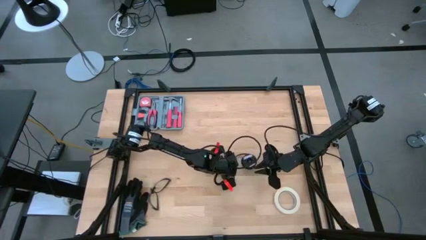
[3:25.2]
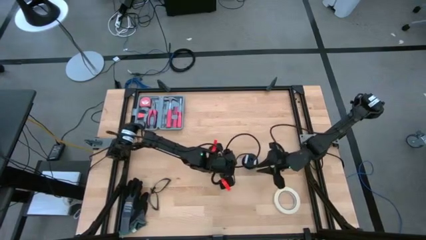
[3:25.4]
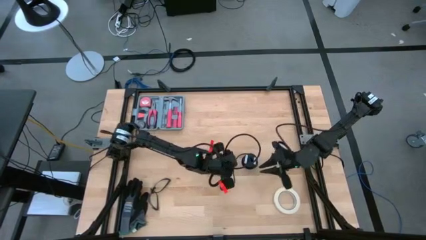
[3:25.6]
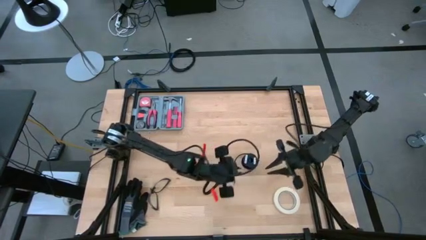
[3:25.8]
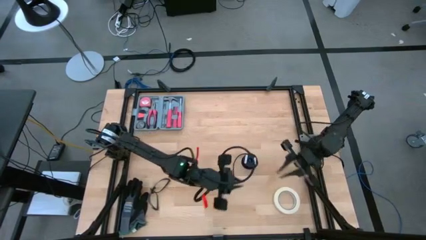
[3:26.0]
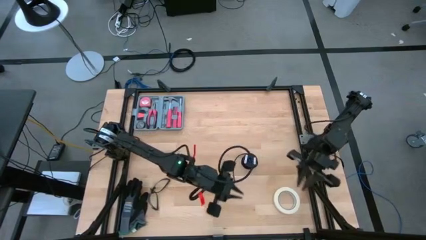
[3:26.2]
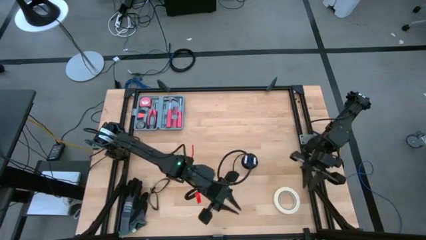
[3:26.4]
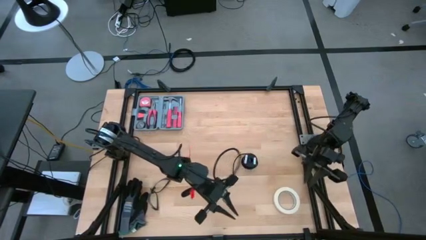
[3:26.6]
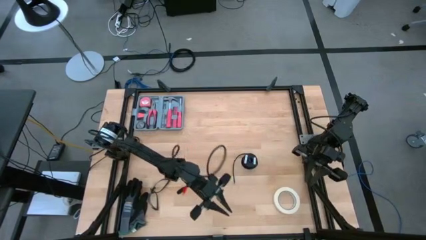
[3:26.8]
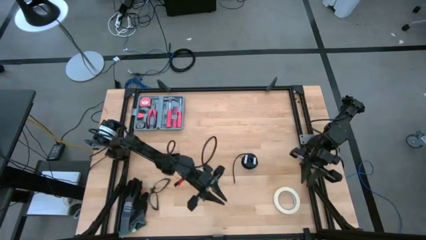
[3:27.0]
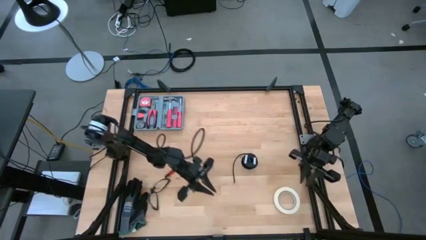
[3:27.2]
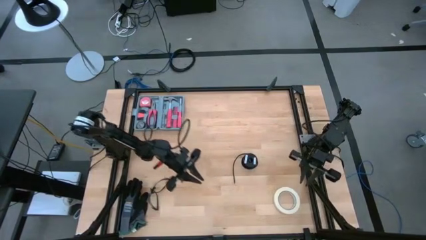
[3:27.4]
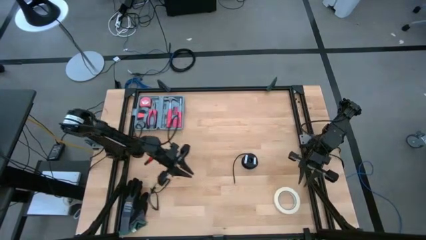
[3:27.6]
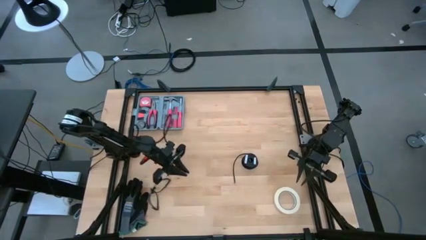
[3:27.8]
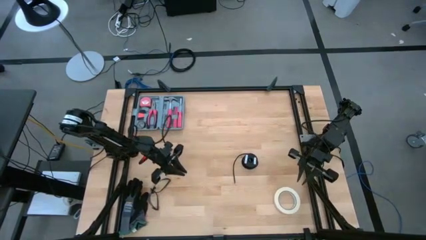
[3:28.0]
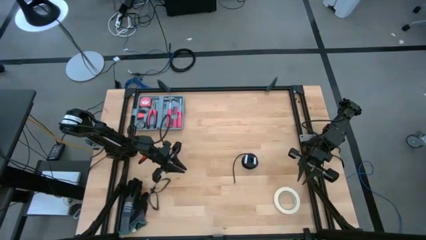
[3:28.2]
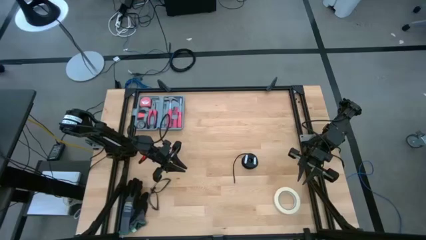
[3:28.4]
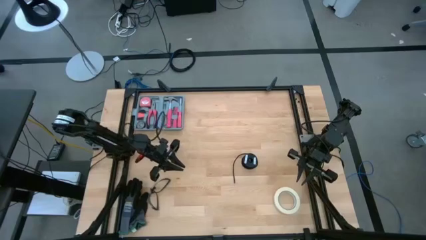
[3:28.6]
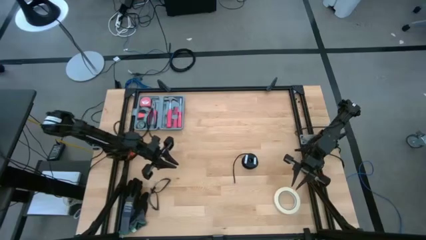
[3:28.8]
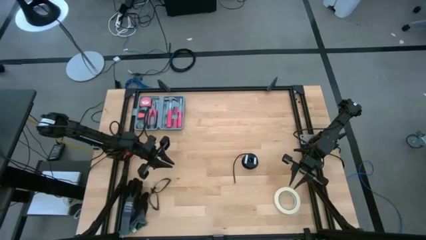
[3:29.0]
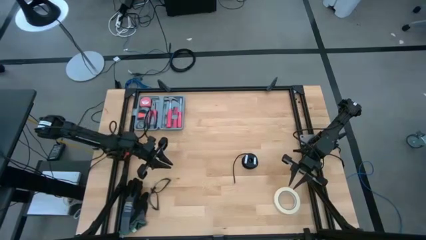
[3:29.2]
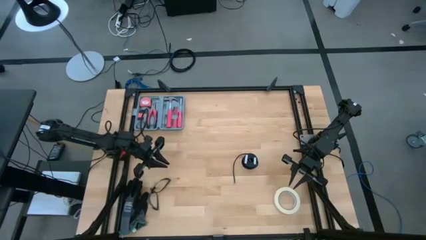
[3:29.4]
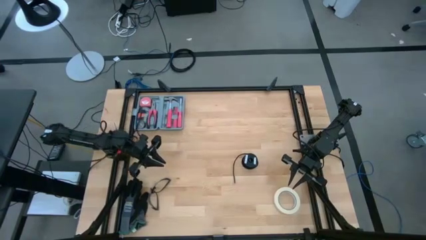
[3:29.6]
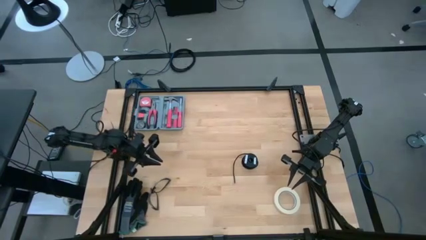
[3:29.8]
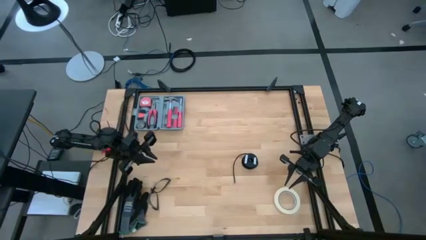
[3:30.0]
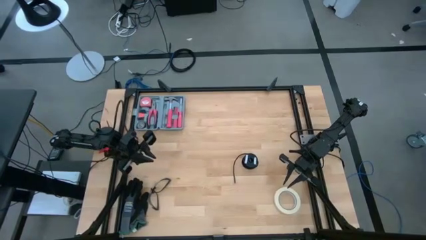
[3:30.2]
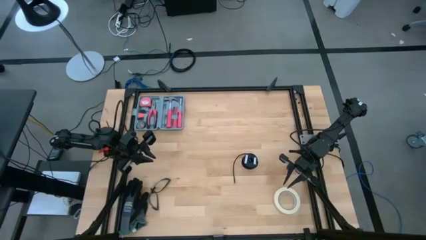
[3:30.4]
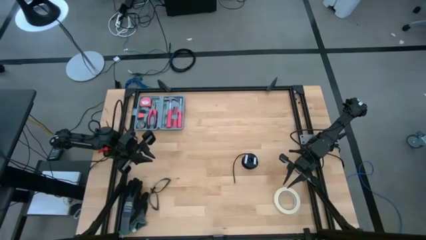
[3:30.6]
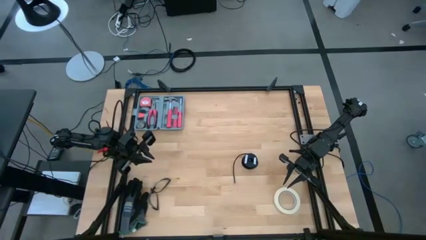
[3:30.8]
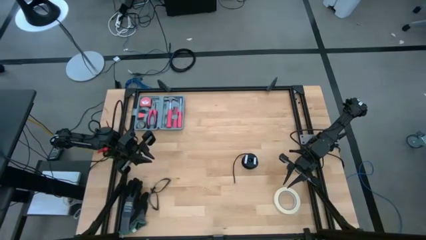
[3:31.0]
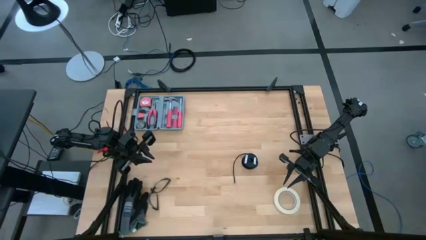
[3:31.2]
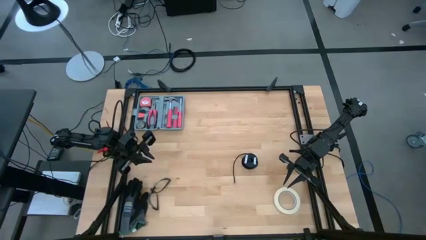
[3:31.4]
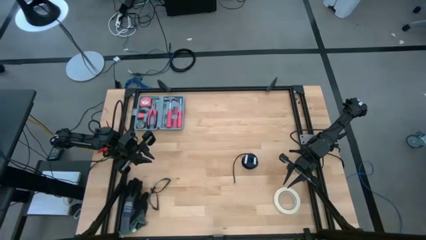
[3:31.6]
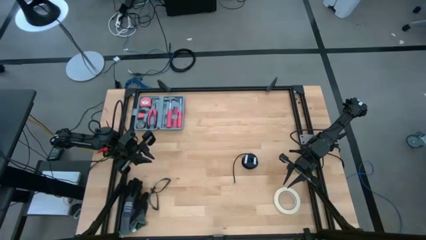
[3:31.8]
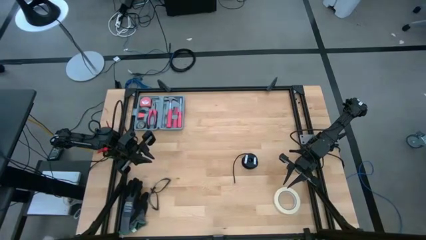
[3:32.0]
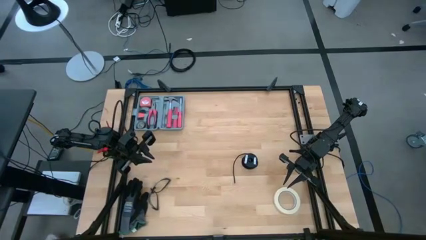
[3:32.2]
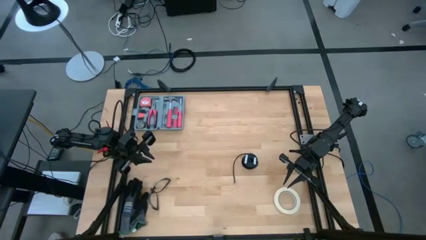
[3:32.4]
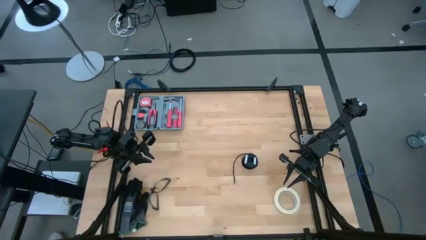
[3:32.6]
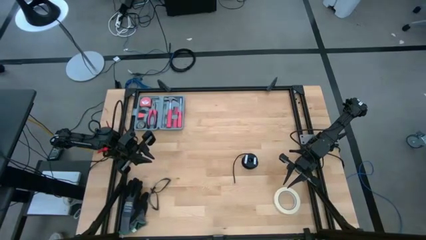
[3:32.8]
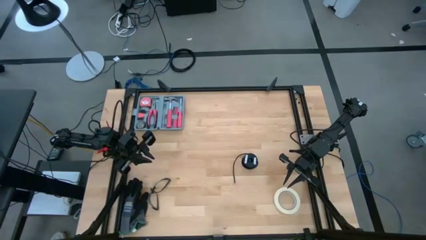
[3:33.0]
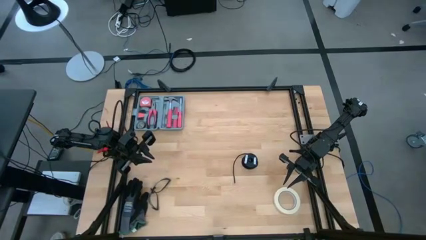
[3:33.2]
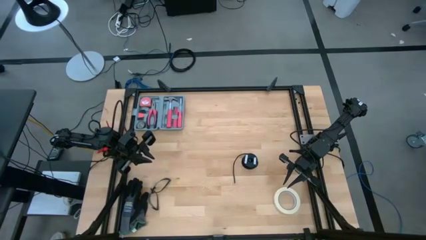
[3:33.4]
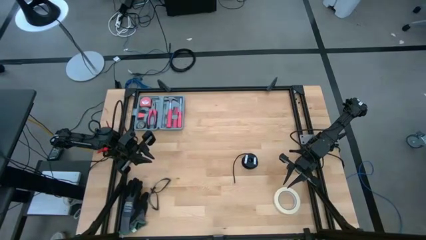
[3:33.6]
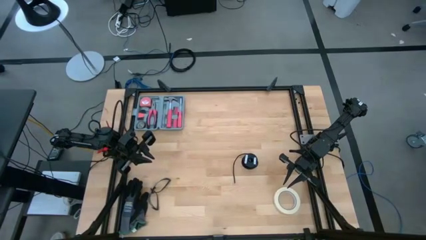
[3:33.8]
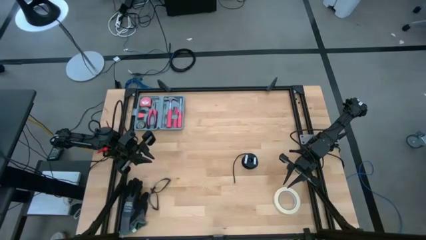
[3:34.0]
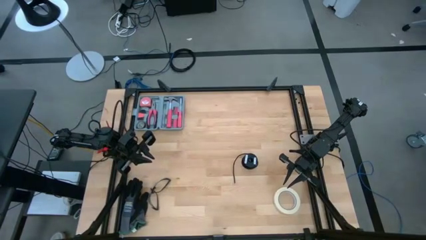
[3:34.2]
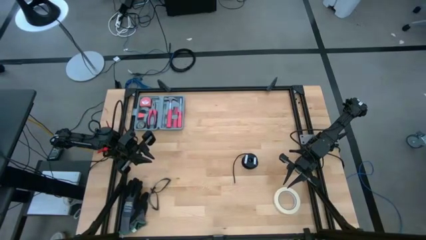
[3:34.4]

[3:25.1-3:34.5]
Task: Coil cords
Return to Home Position

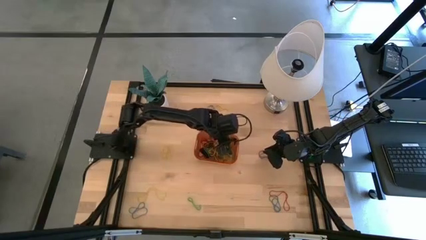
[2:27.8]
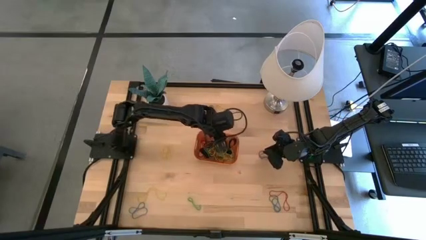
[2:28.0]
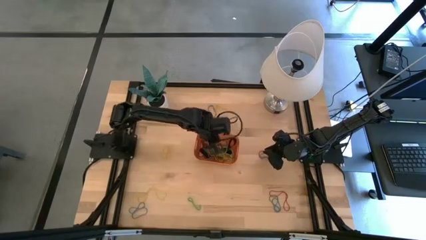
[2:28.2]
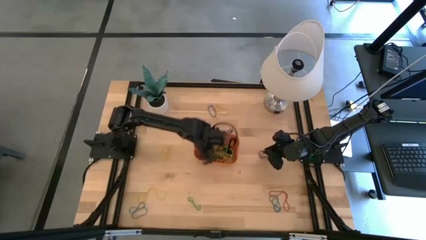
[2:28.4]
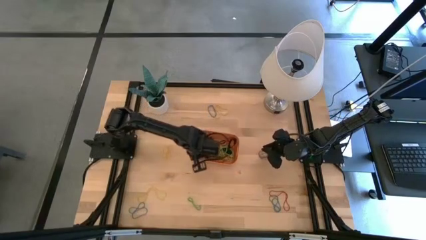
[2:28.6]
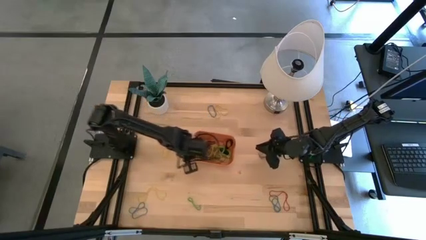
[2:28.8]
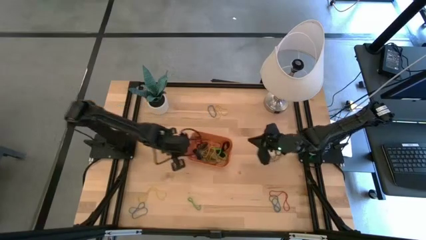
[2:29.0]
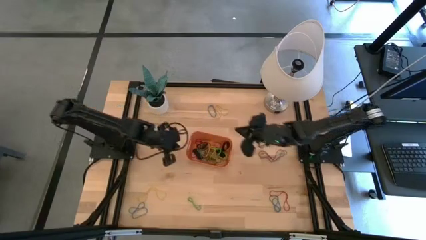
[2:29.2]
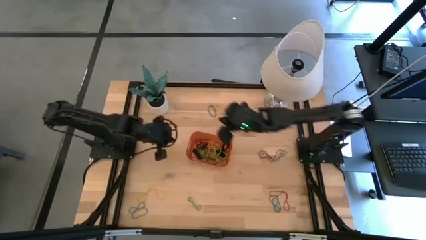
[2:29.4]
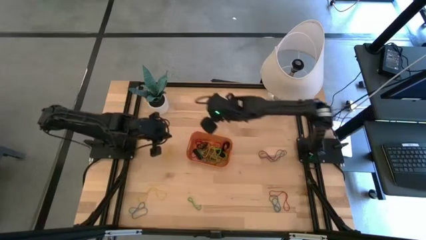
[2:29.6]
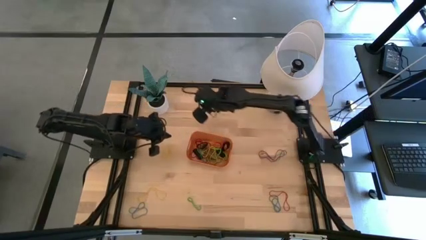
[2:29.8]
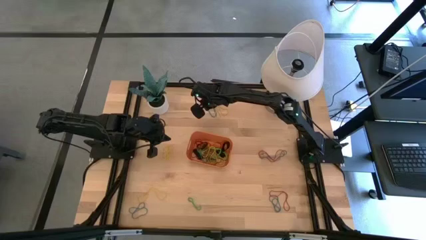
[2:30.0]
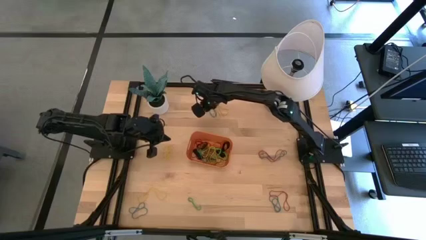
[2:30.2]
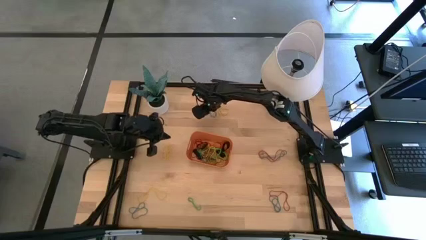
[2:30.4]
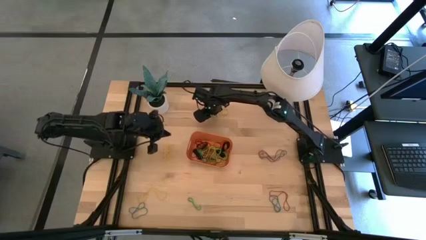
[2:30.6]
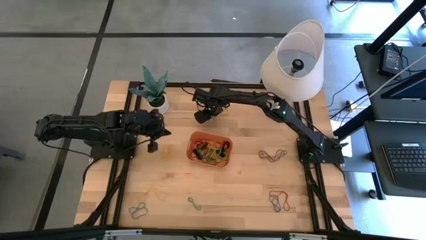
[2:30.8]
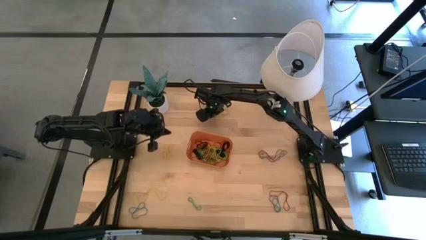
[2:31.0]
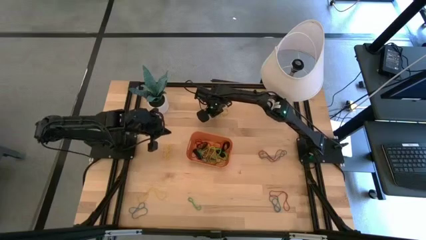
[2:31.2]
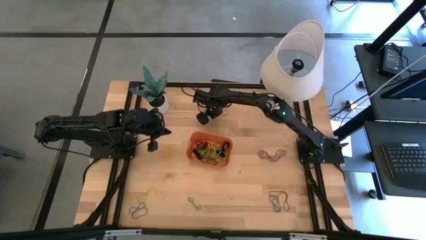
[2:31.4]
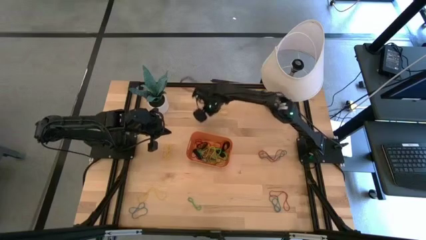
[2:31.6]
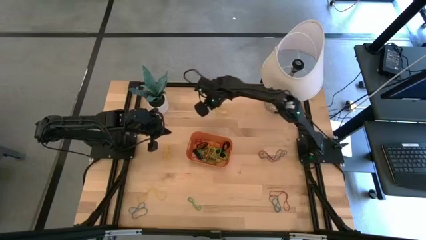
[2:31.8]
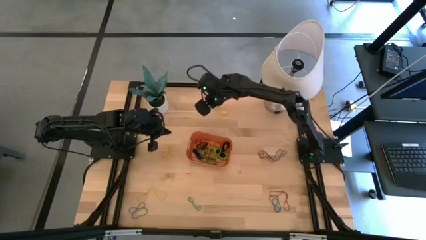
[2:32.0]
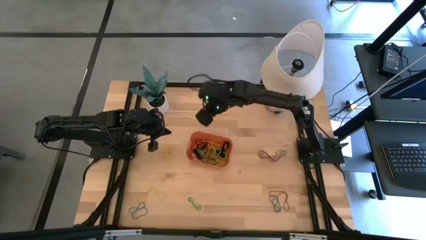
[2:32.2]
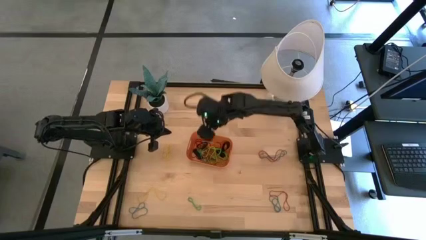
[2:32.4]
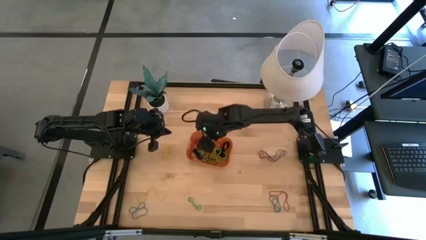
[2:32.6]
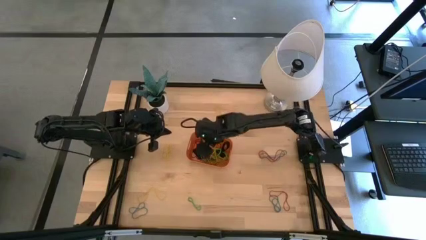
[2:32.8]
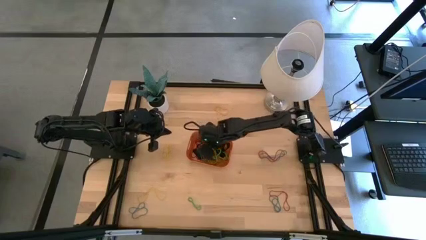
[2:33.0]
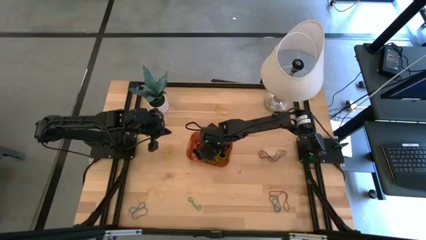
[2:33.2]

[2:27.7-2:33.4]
Task: Pick and place rubber bands into bin
Put the blue rubber band into the orange bin

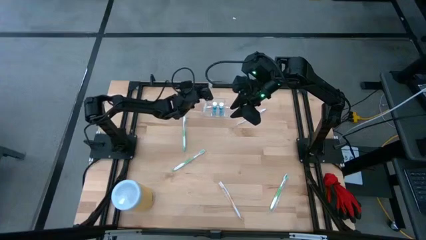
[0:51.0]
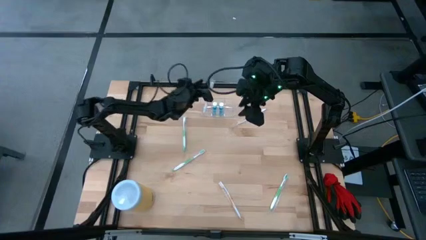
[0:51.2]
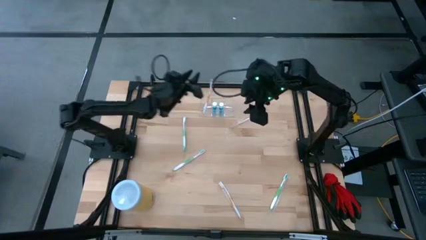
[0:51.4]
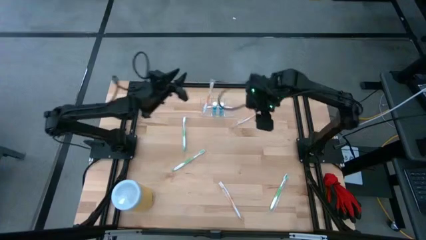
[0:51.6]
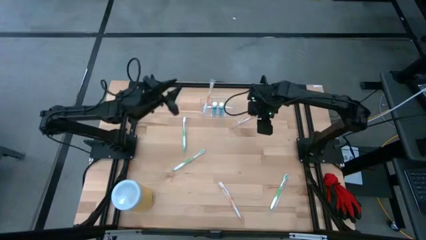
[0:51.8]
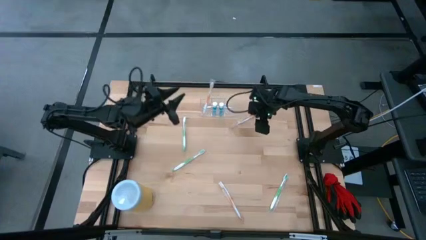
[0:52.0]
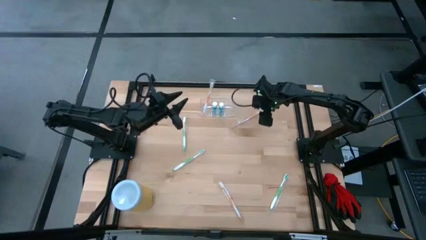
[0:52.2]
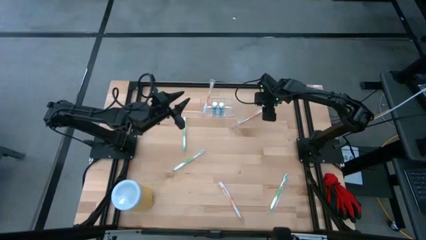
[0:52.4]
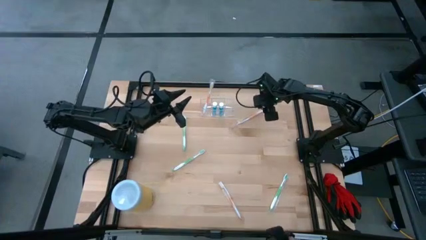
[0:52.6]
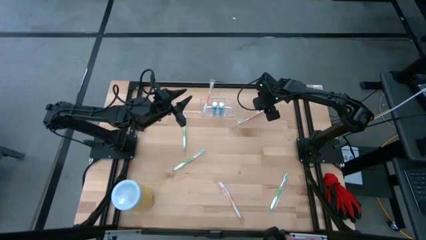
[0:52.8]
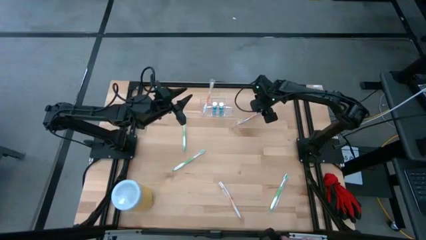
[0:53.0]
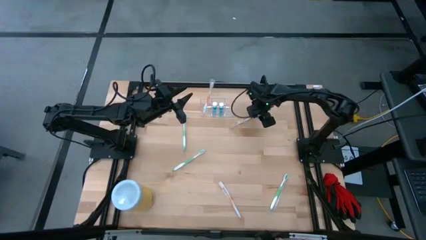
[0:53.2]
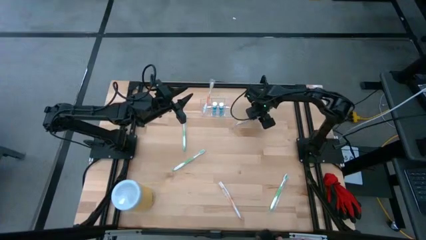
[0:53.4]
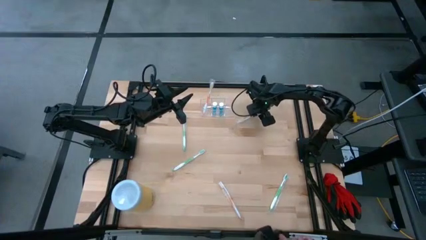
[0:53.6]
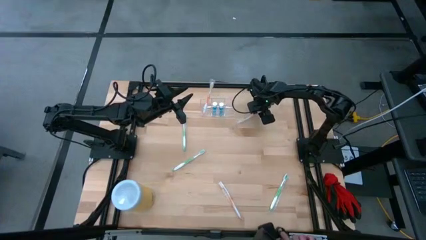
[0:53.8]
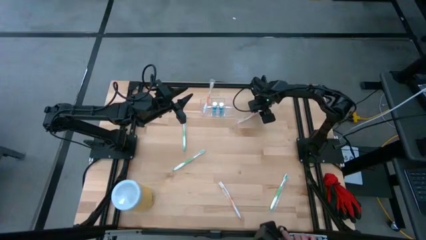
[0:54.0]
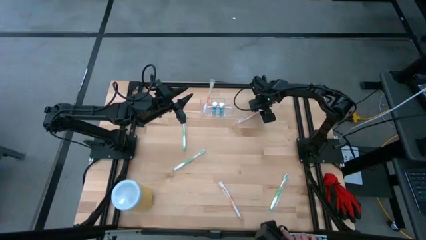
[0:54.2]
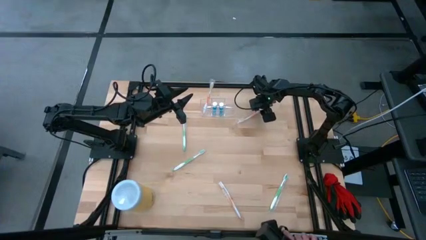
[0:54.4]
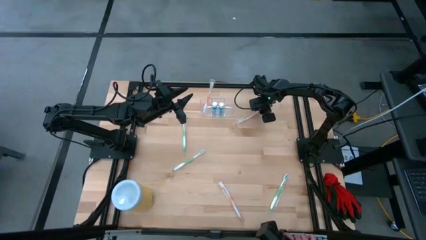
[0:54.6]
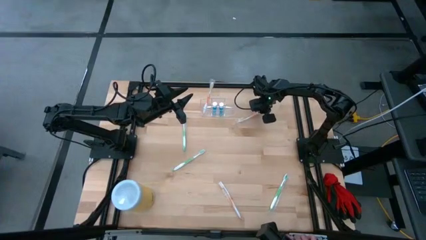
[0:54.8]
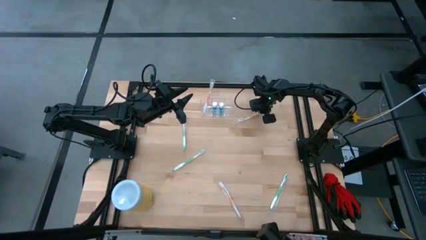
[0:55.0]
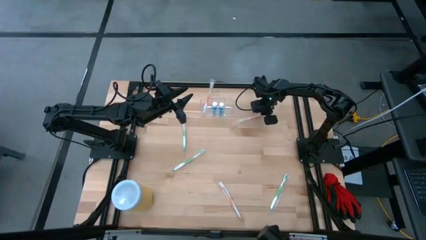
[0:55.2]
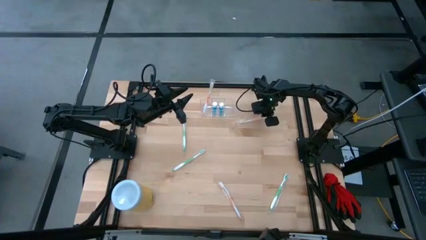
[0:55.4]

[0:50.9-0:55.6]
Task: Pick & Place toothbrushing station
Put the top orange toothbrush into the transparent organizer
